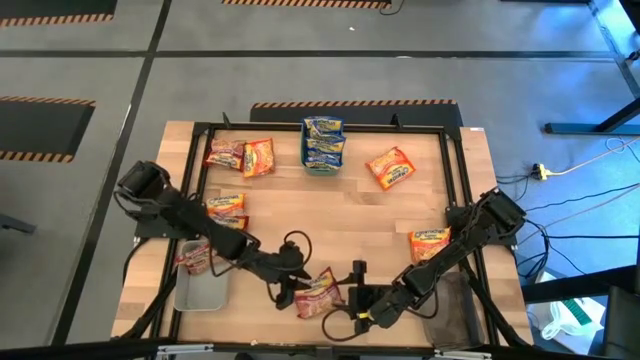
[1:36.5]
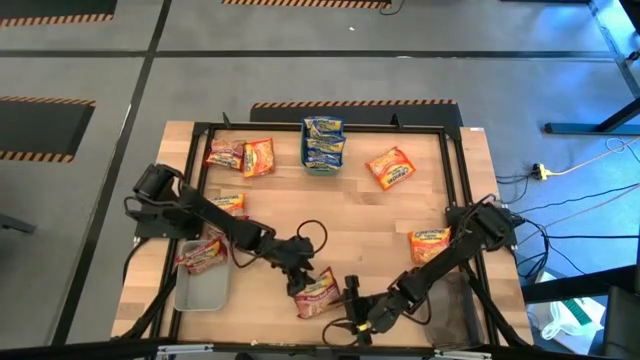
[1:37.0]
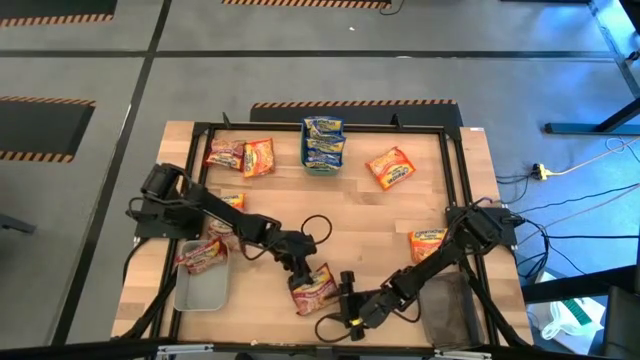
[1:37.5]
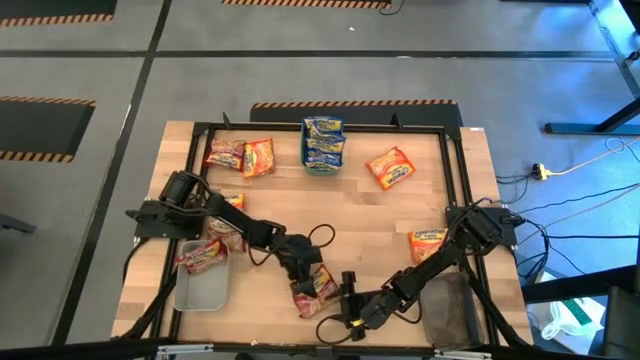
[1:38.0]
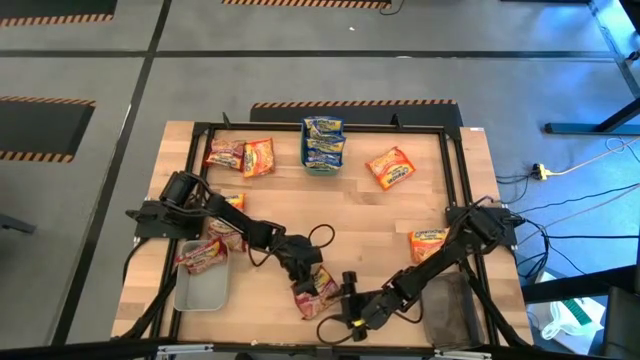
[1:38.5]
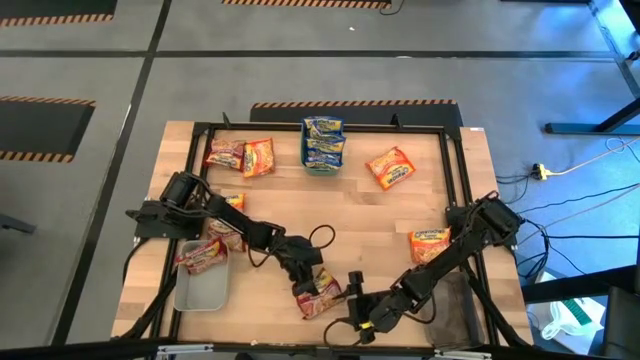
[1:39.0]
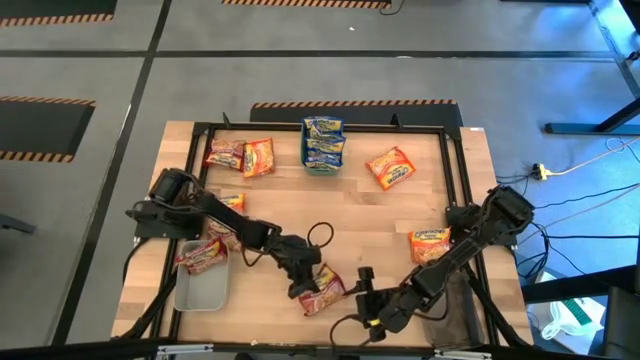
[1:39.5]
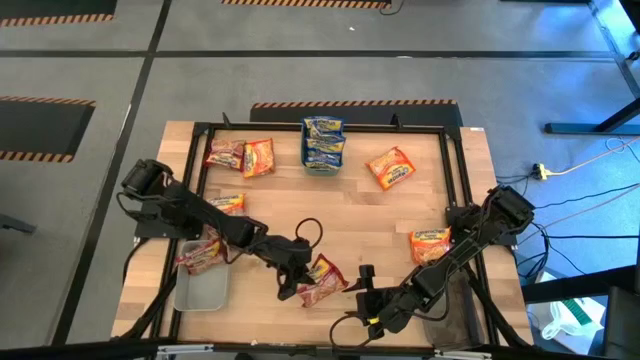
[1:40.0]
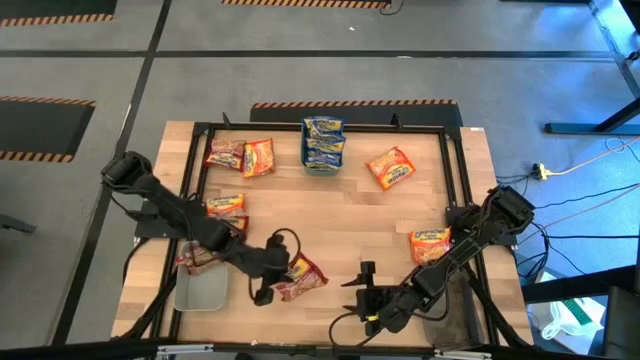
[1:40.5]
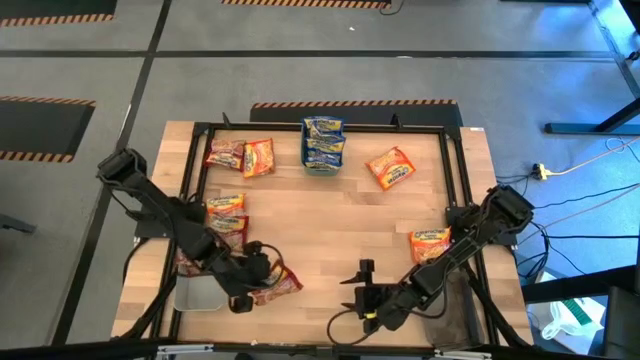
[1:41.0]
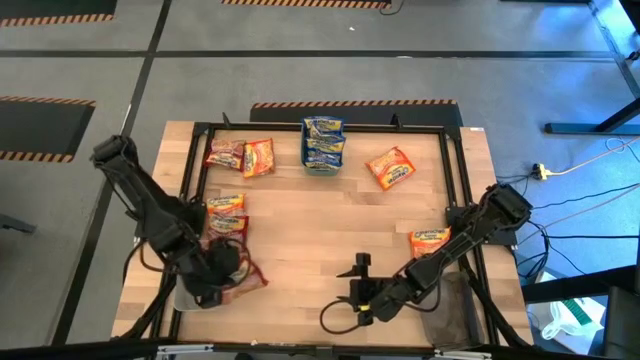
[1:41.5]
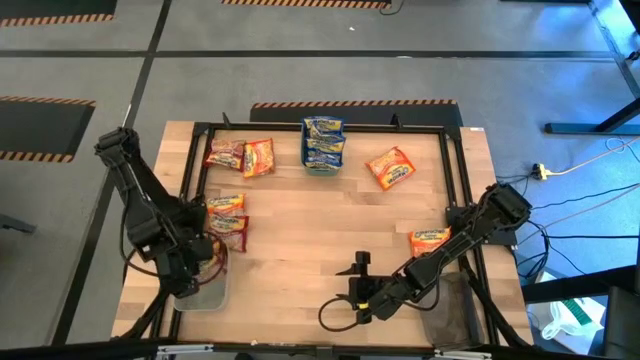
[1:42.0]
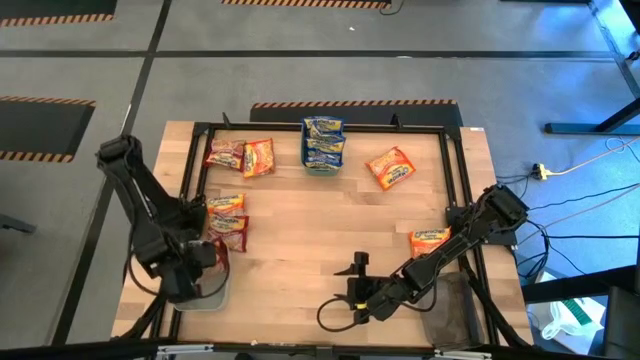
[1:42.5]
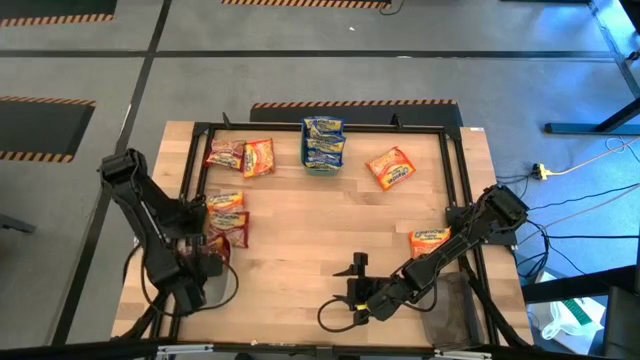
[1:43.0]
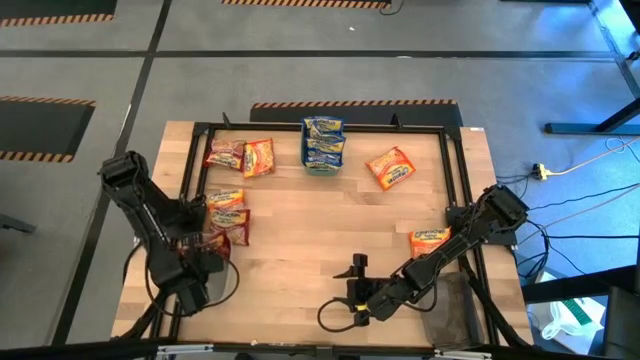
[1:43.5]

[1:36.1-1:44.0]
Task: Sort Maruchan noodles
Put the red noodle pack into the gray bin

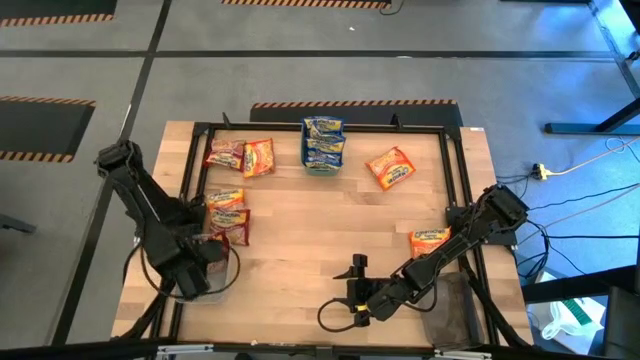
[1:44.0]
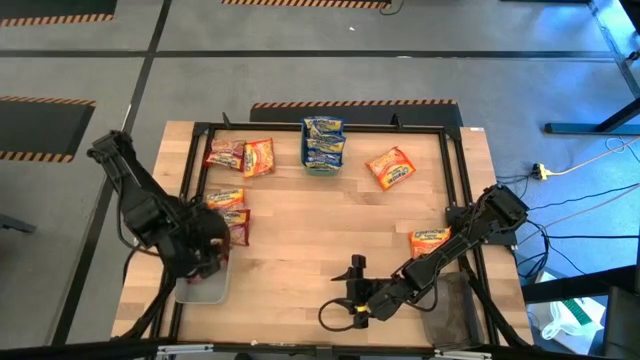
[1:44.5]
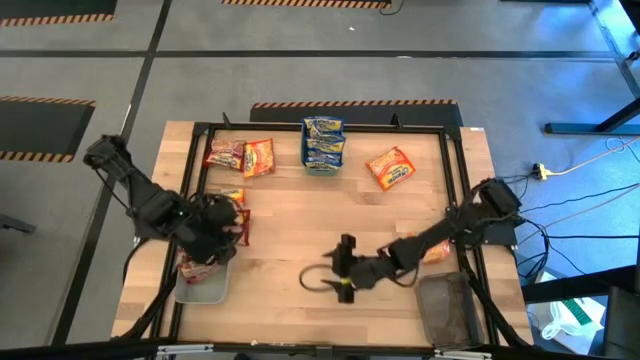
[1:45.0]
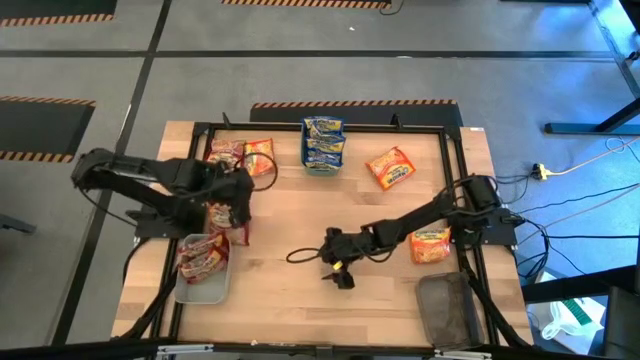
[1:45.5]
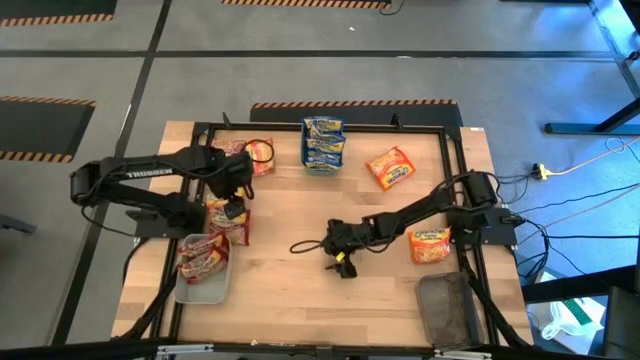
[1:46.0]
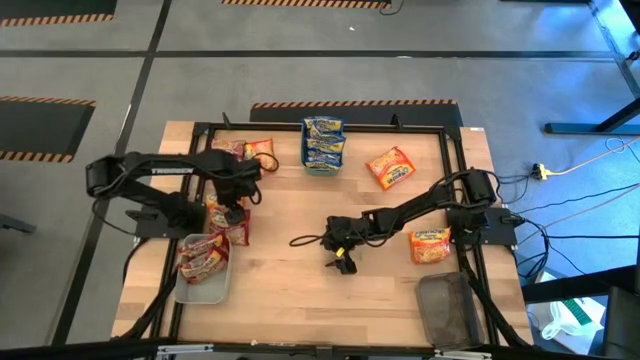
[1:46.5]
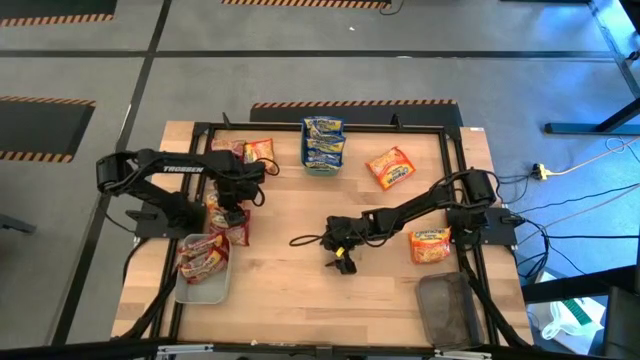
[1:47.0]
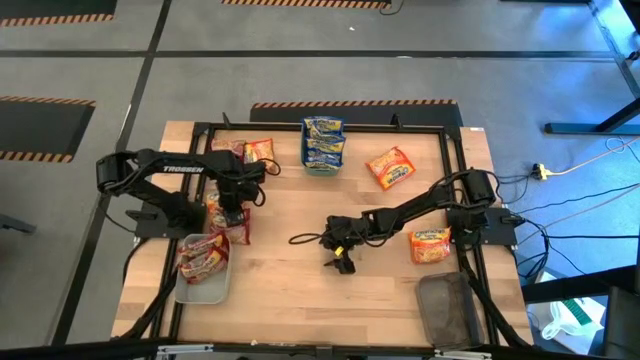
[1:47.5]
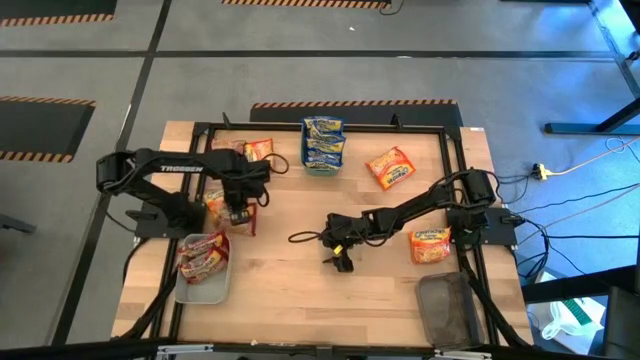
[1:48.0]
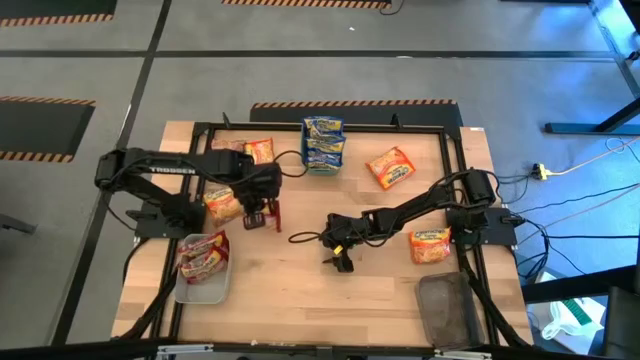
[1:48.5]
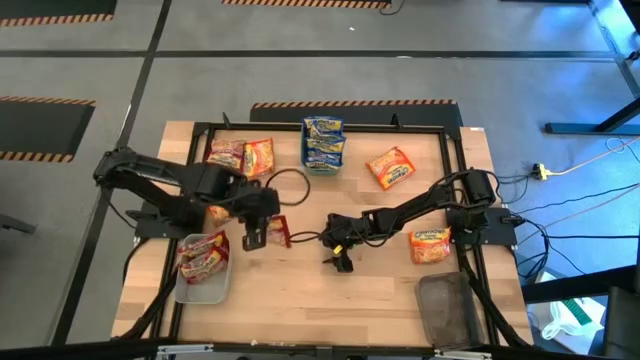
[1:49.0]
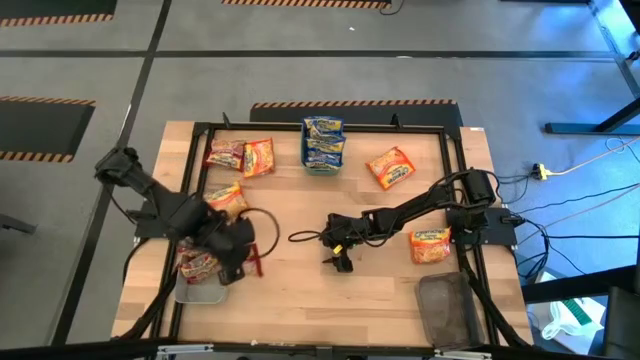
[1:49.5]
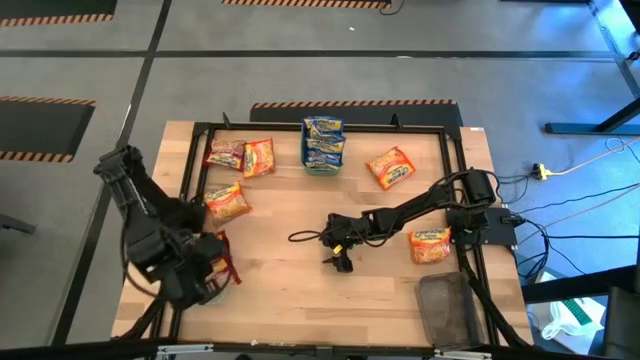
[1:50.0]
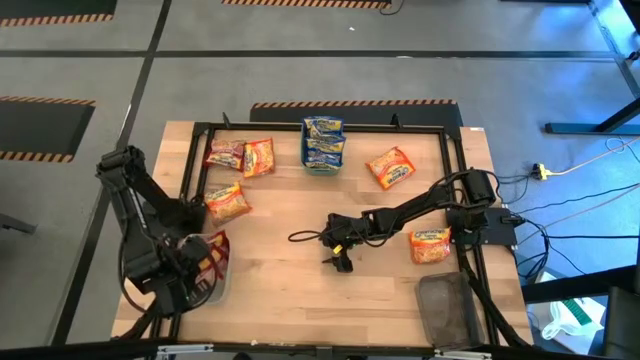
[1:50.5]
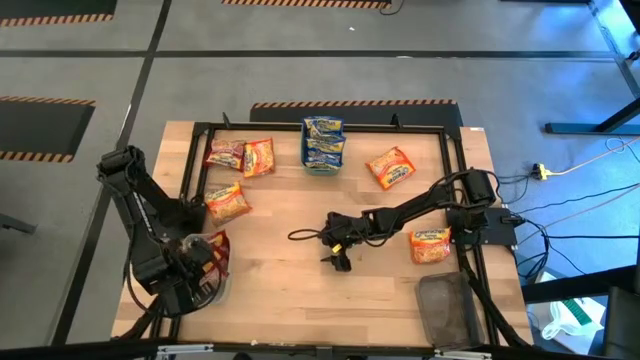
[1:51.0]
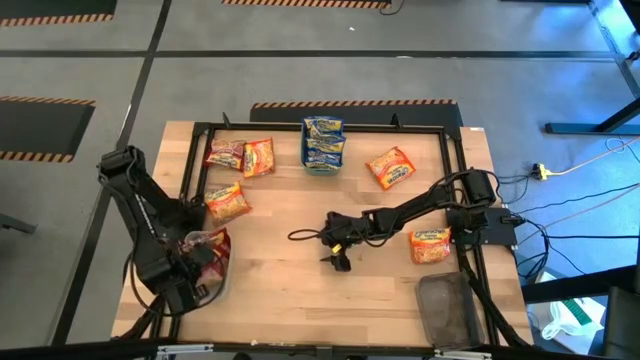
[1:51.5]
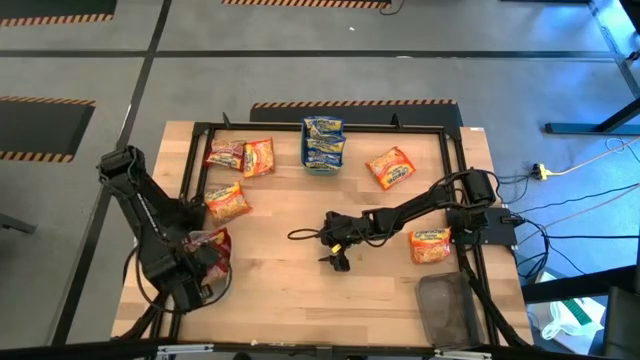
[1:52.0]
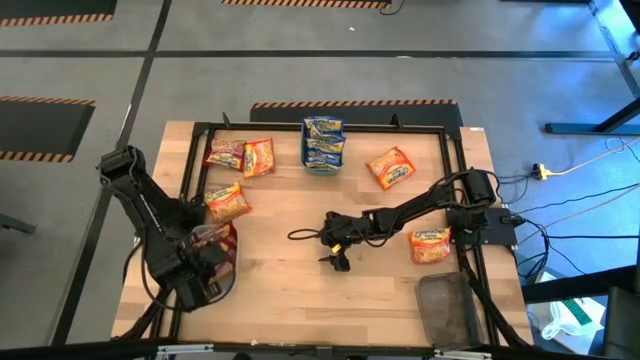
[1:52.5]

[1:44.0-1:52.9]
Put the red noodle pack into the gray bin

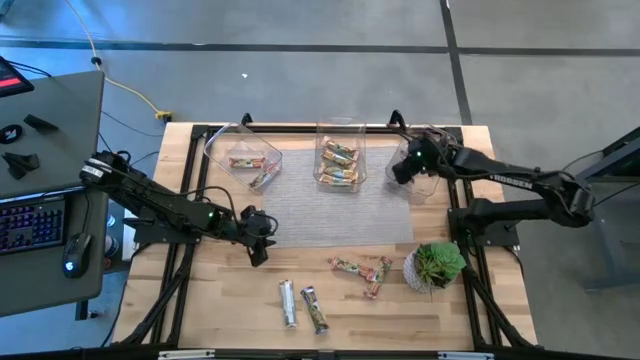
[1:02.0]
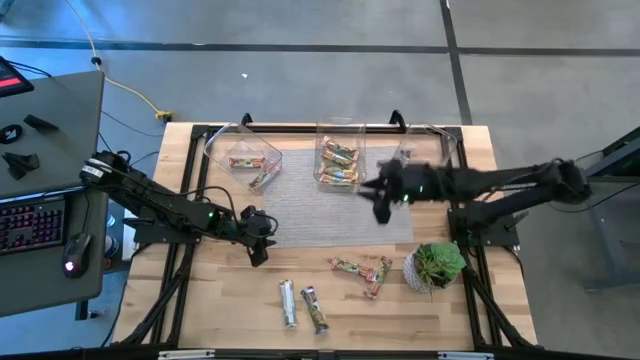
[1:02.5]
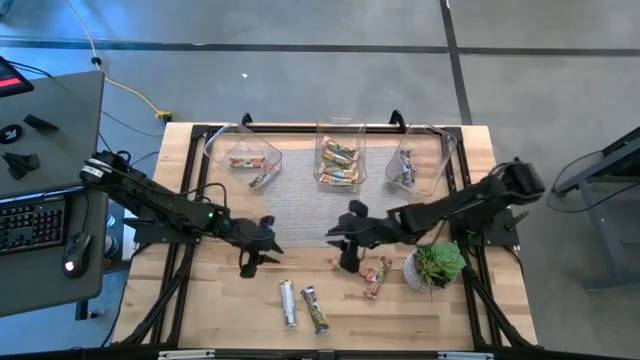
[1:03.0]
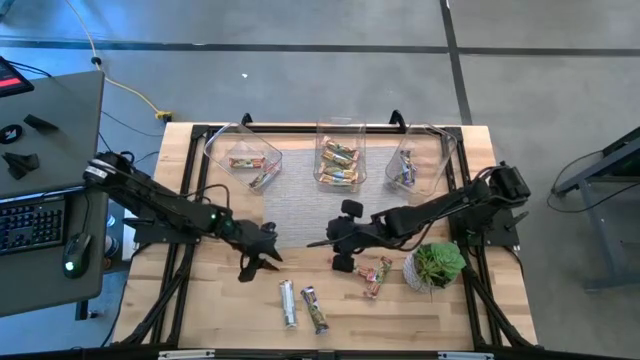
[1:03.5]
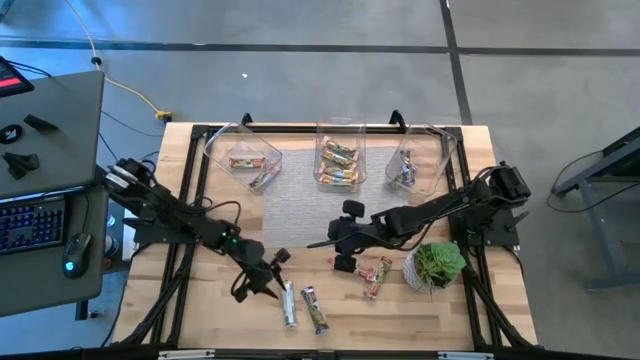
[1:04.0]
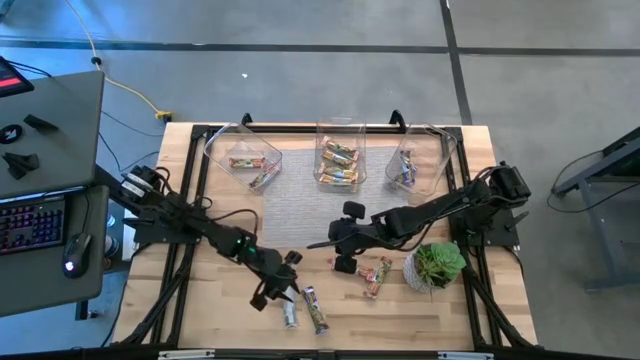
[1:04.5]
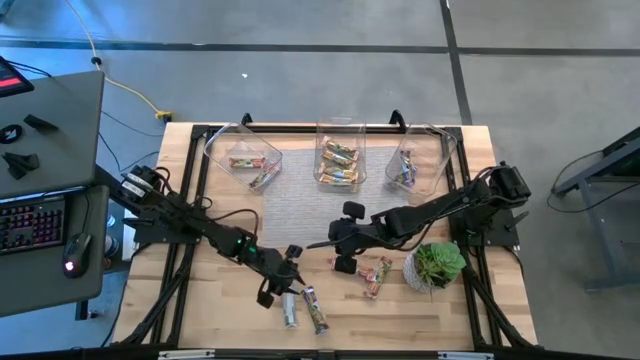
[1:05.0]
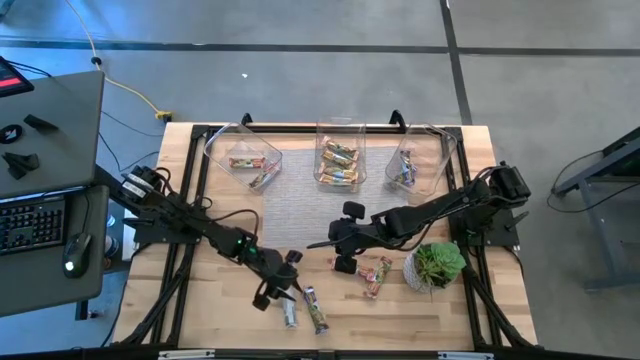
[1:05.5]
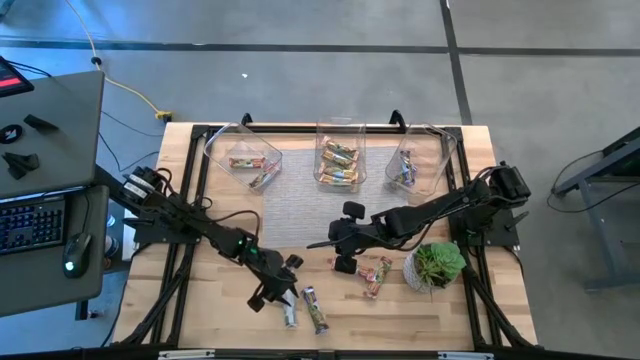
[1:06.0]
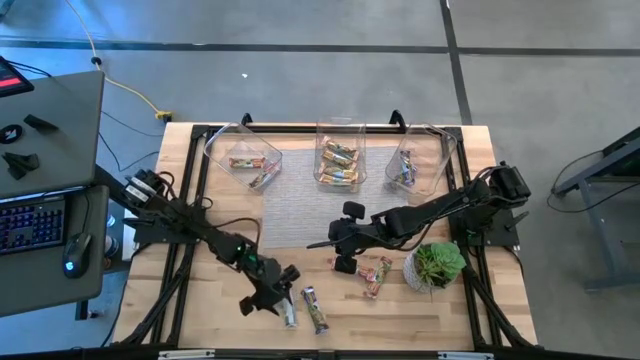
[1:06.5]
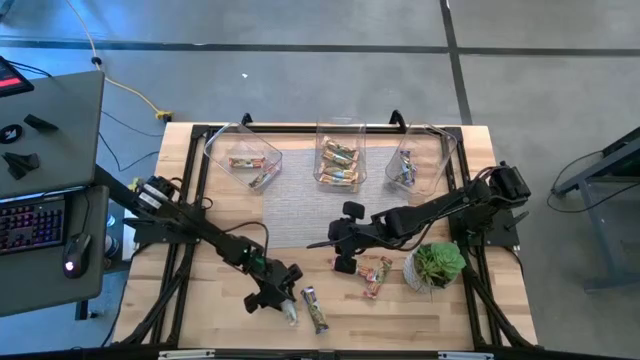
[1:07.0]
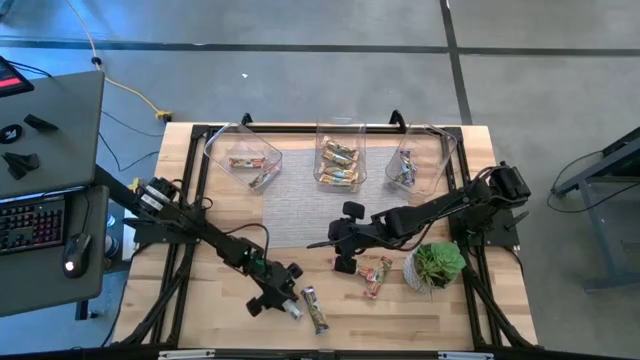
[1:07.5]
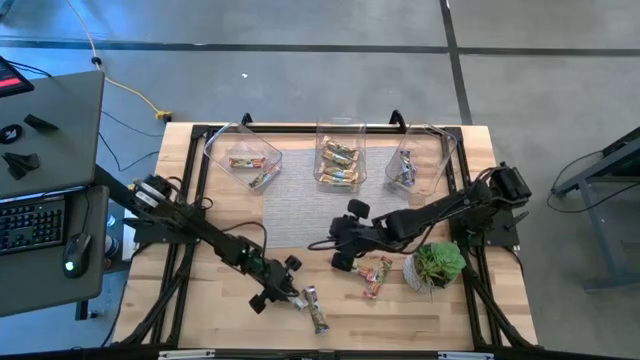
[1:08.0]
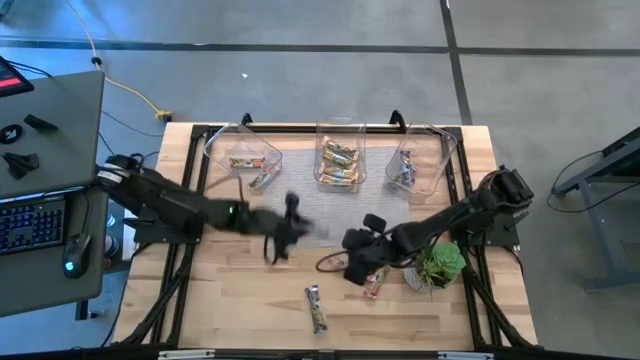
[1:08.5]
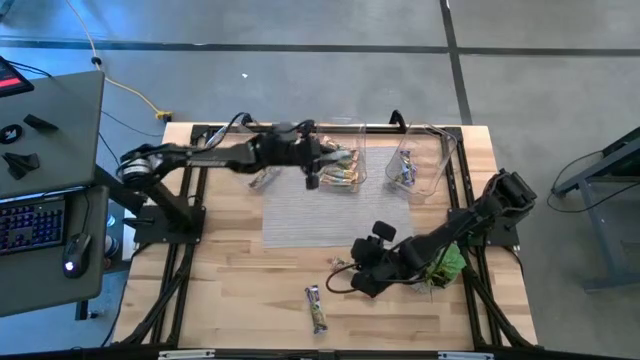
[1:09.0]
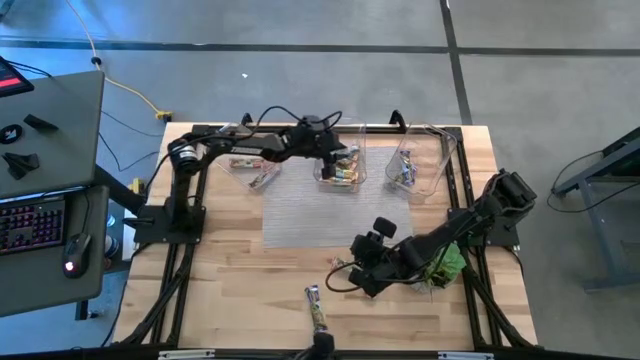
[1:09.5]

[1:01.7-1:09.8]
Task: Pick and place Granola Bars by type
Put the yellow granola bar into the middle transparent bin
